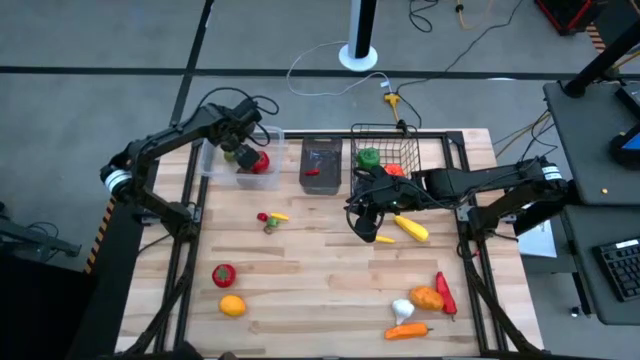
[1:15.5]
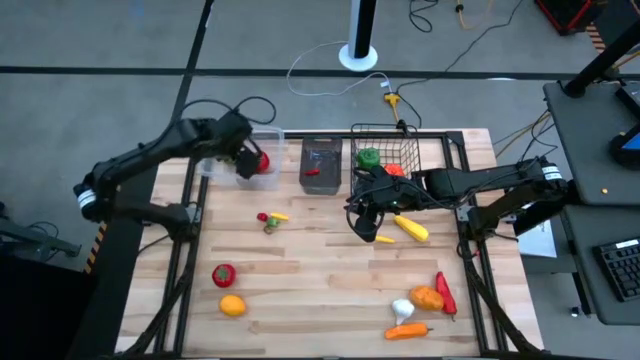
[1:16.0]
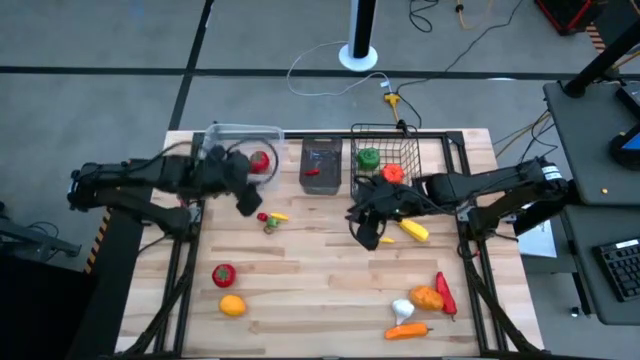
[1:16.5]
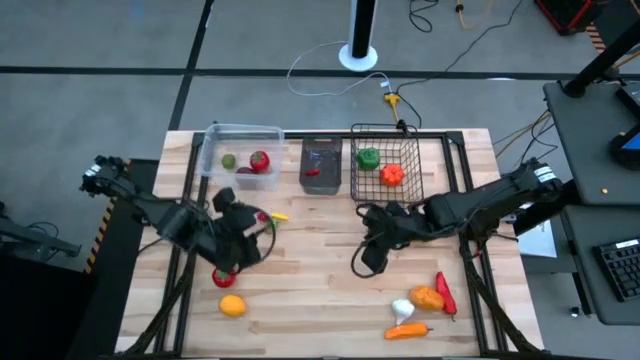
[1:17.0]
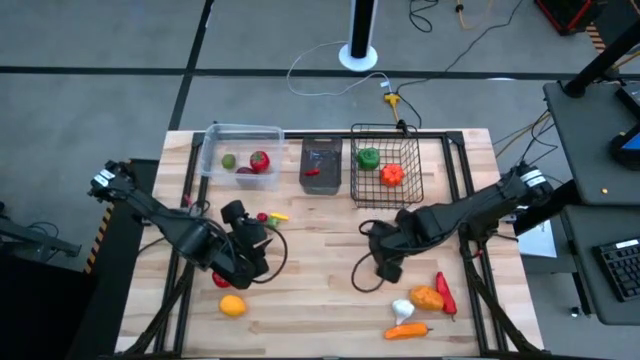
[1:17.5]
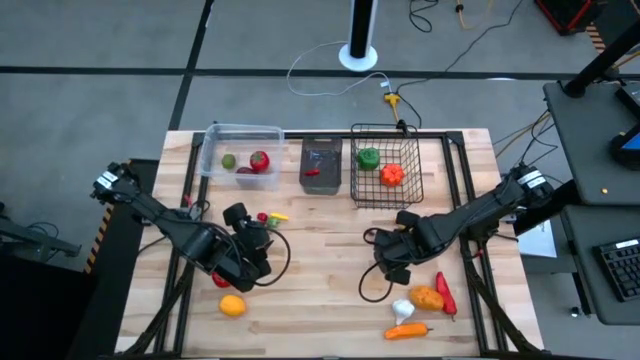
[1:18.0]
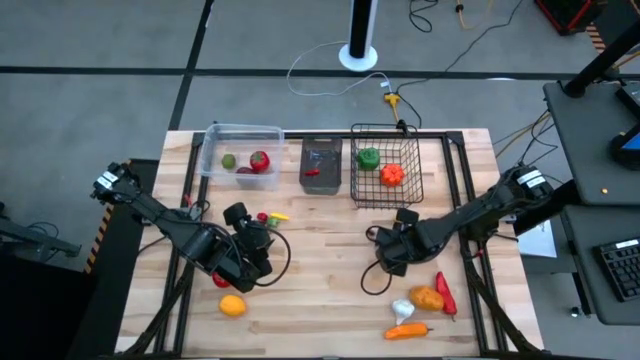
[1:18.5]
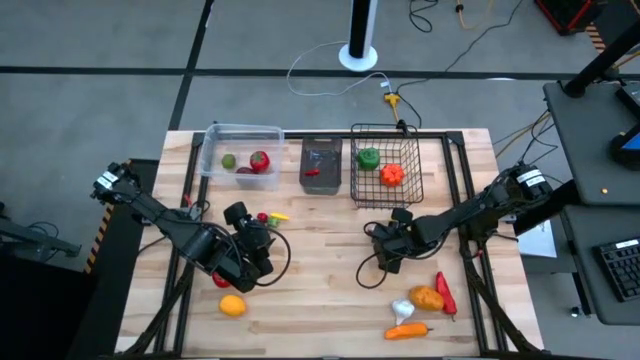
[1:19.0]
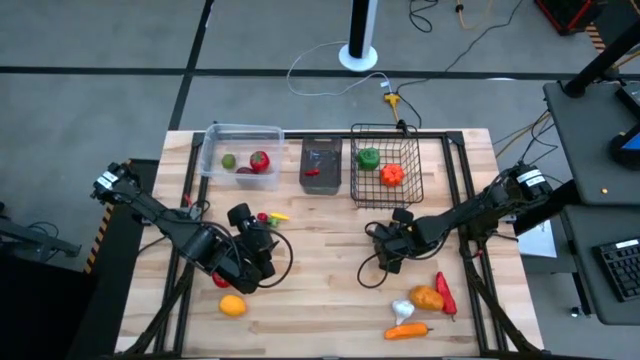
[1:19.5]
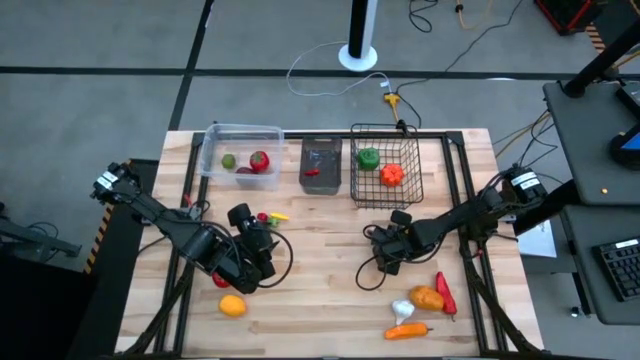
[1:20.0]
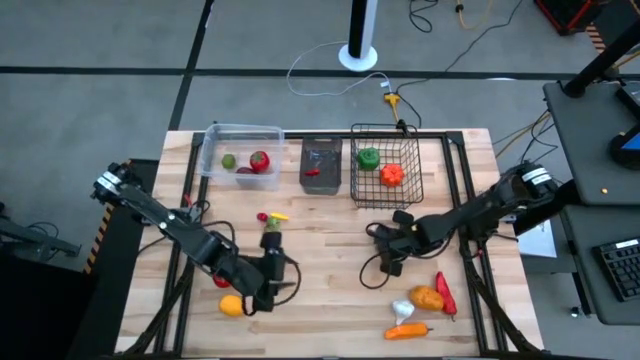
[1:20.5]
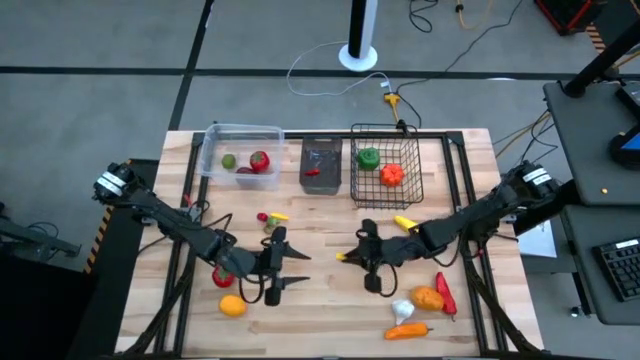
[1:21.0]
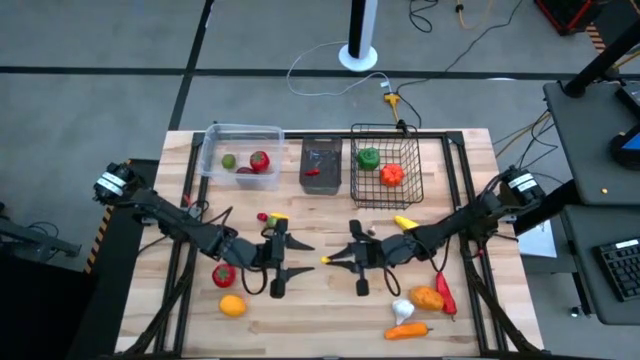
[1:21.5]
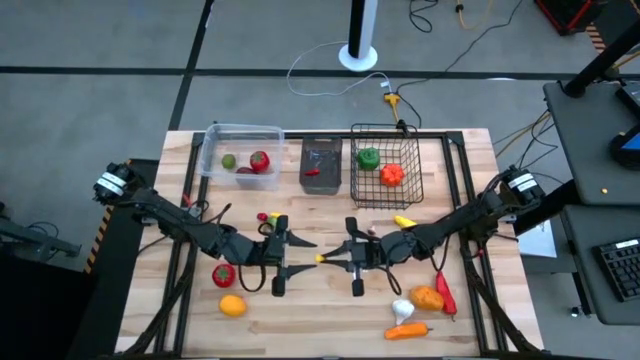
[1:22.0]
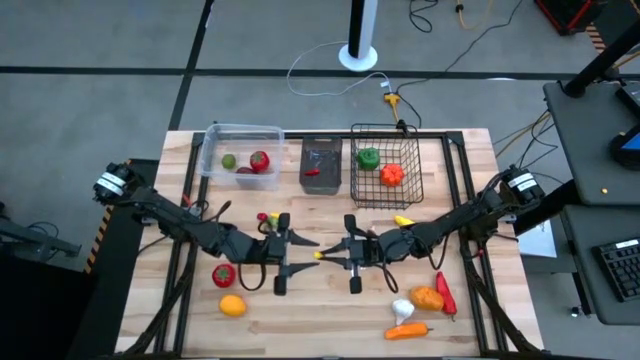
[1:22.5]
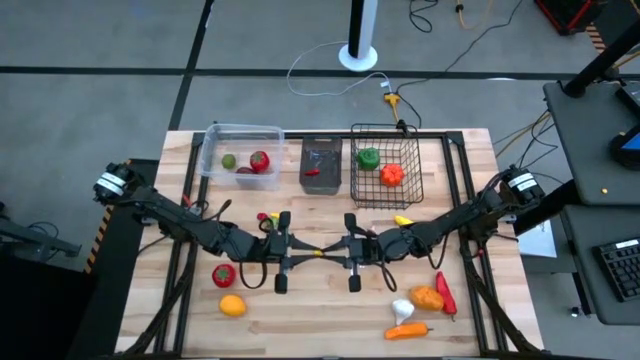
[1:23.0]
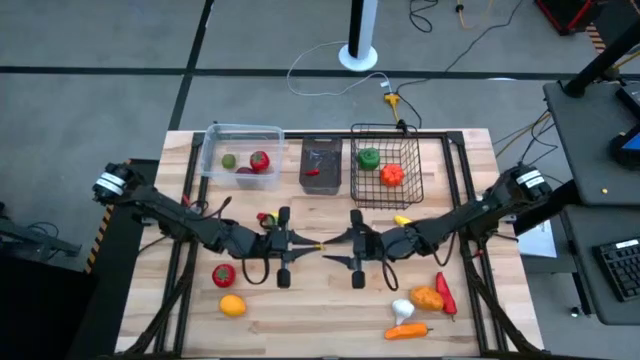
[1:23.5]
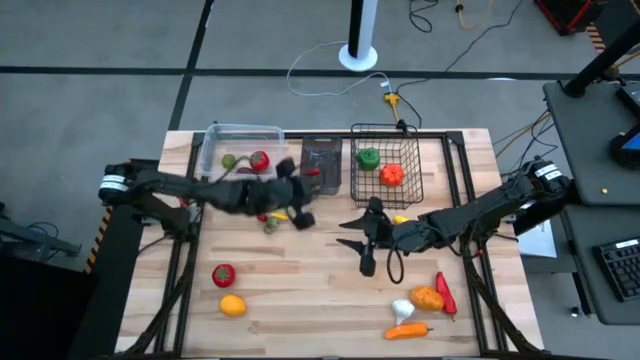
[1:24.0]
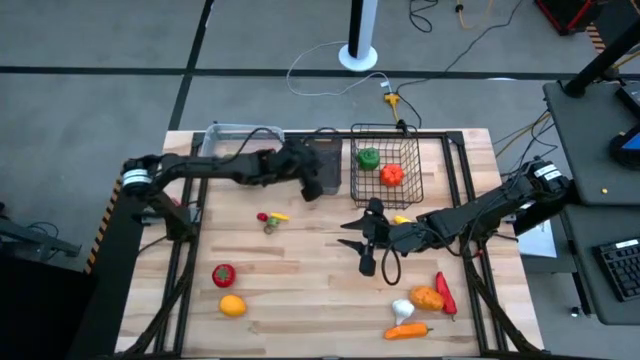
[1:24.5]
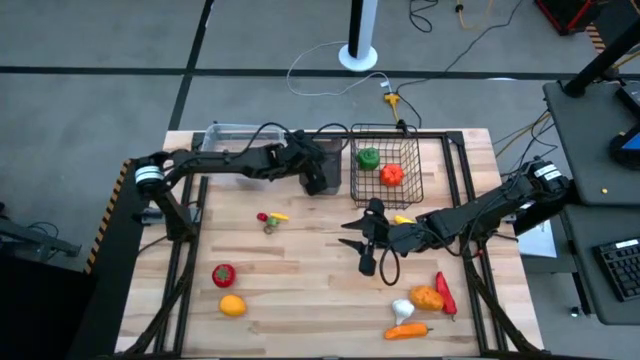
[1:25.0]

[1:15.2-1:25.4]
Task: Sort produce into baskets
Put the yellow corn into the black bin

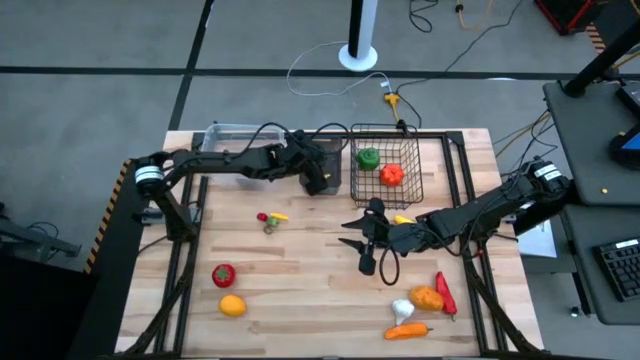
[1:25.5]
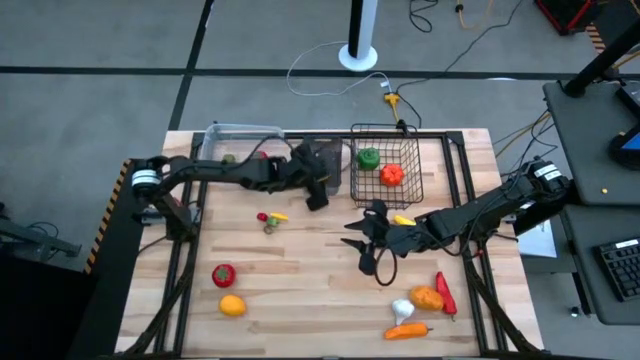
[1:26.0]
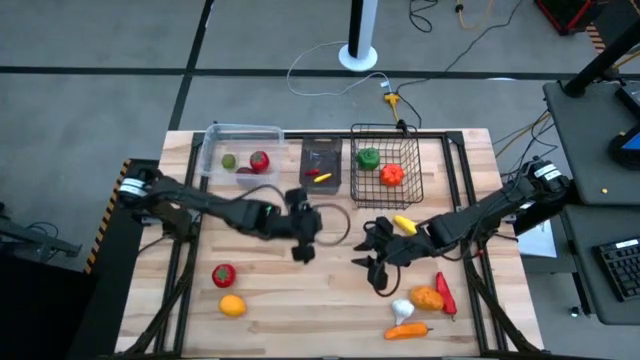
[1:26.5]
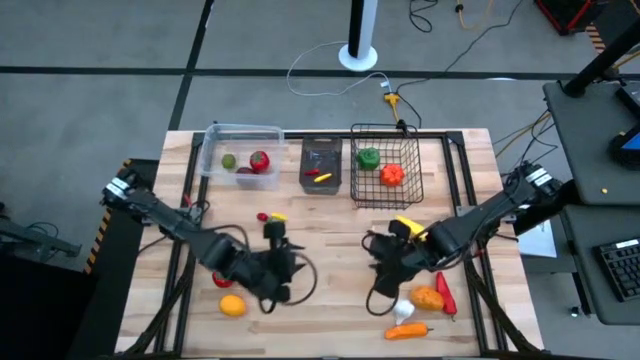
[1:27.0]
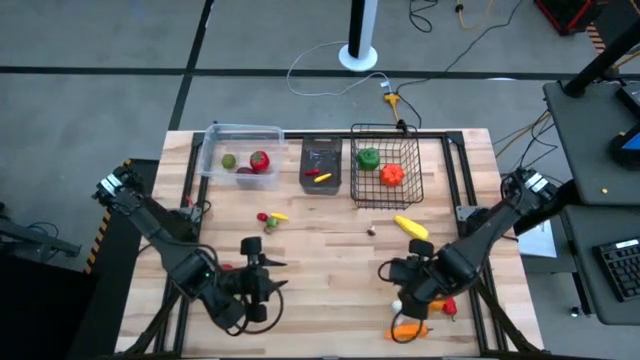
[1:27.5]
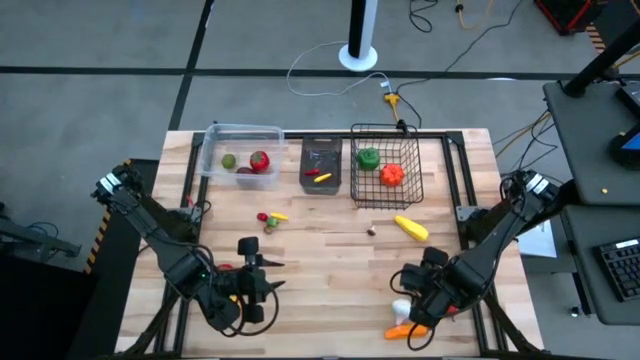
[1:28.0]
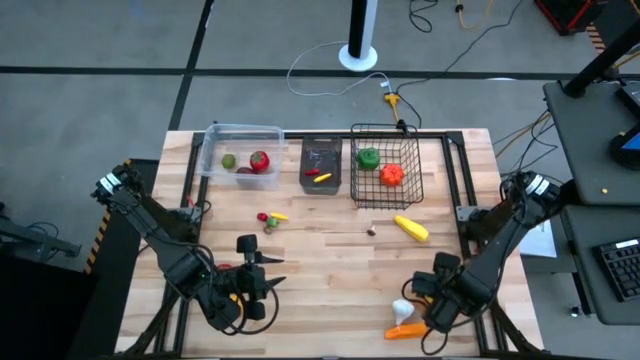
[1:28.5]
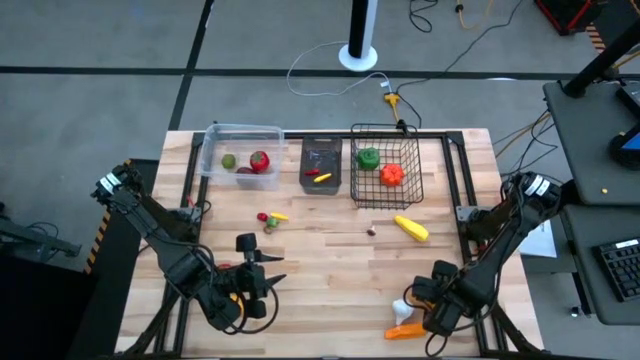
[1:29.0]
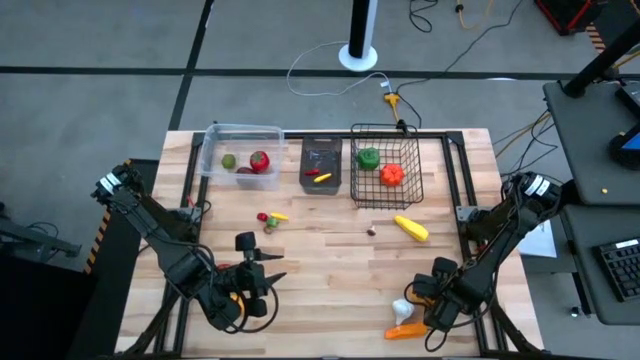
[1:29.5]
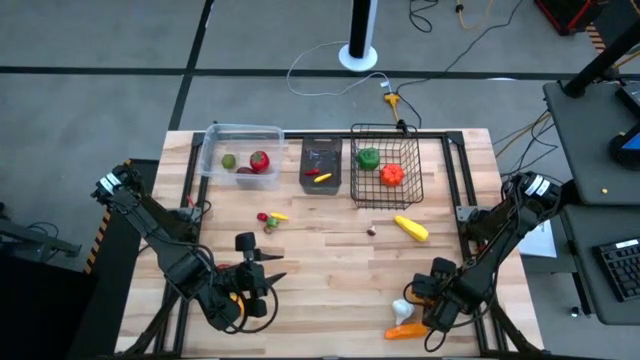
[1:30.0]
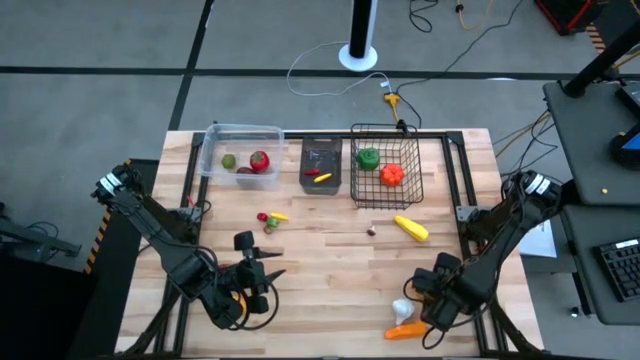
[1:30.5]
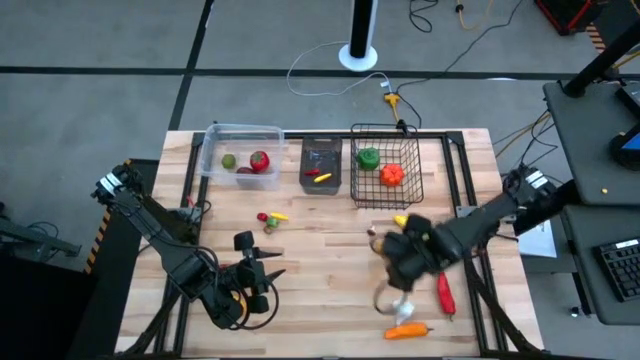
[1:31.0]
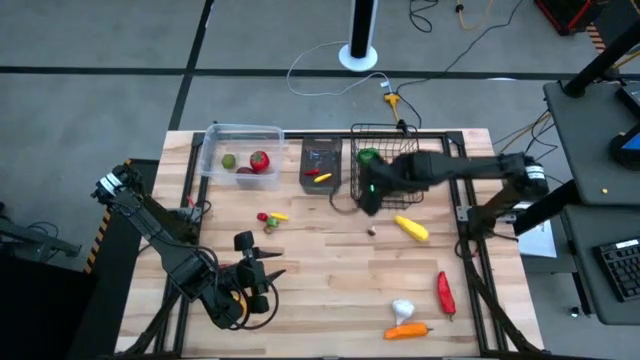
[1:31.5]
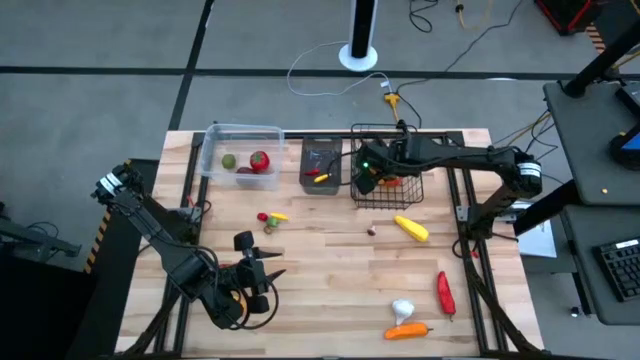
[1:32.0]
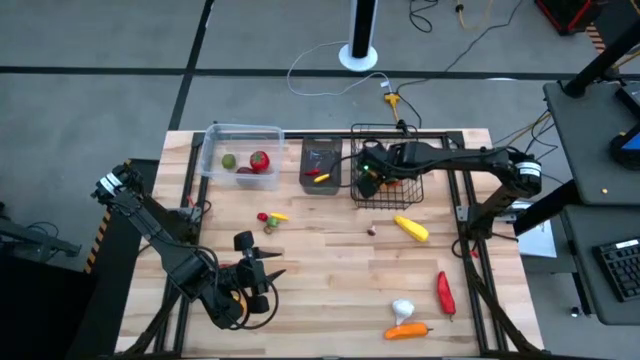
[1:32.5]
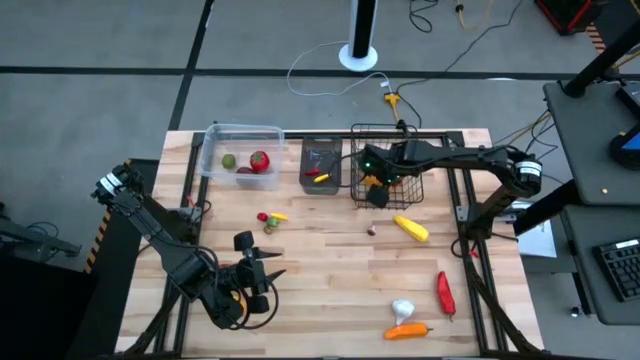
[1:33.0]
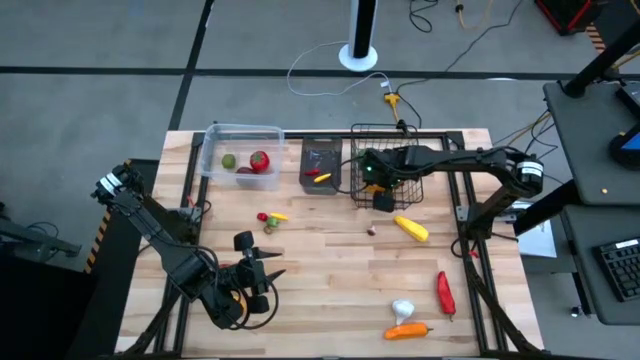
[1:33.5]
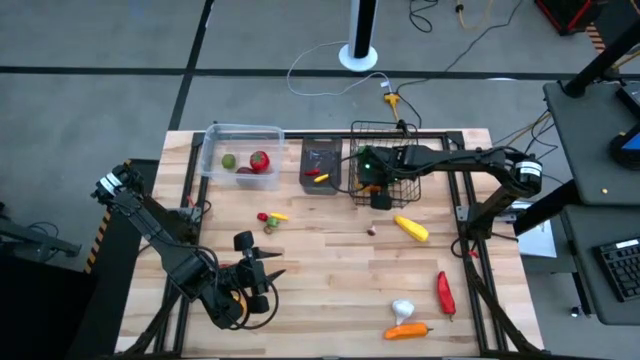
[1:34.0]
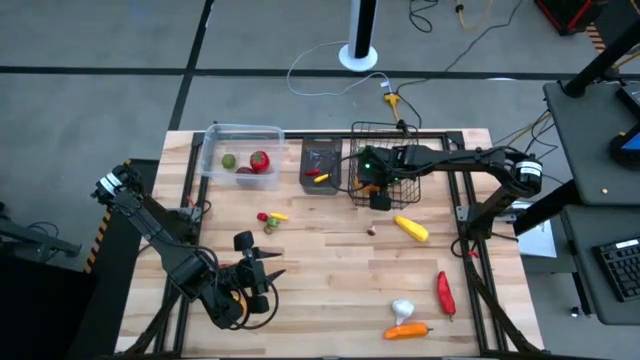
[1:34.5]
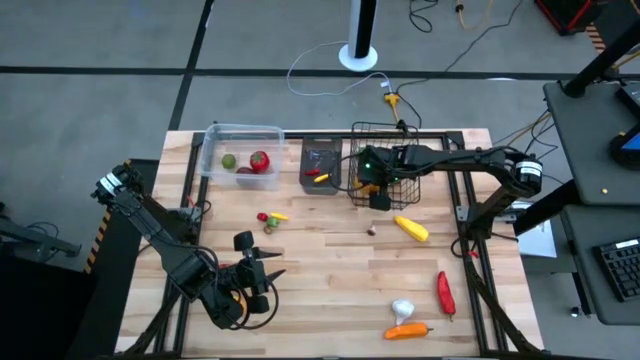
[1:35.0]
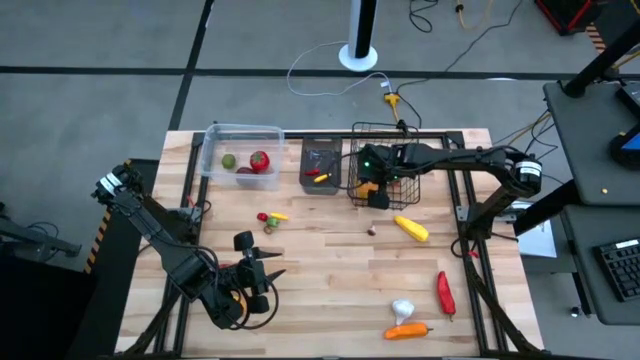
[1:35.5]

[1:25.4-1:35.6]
Put the brown potato into the black basket
